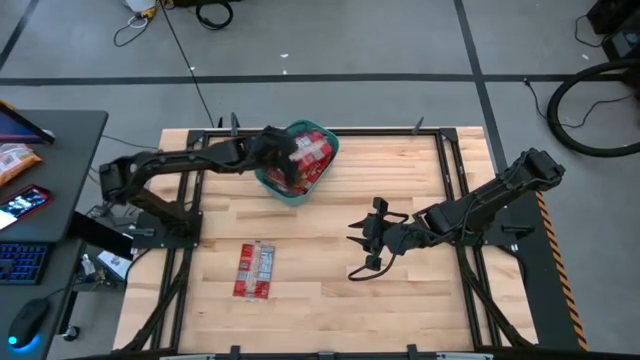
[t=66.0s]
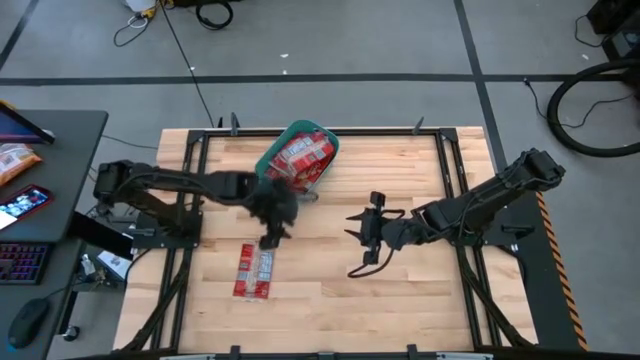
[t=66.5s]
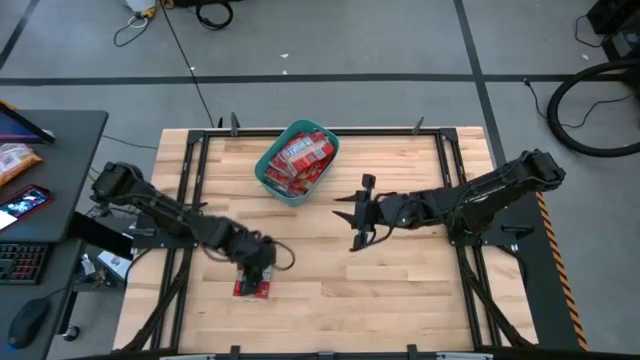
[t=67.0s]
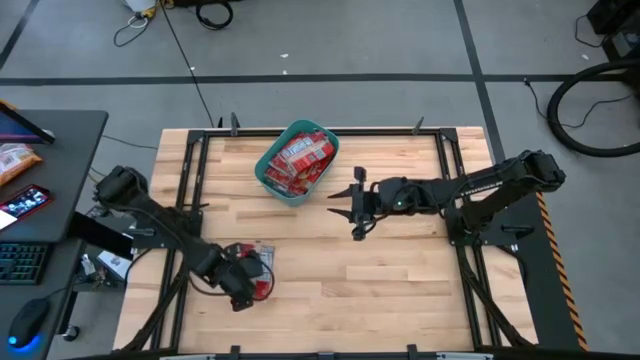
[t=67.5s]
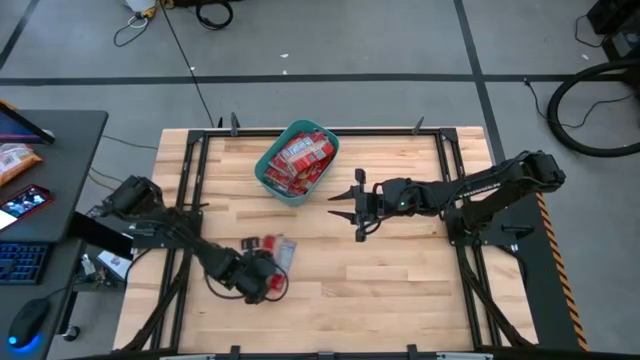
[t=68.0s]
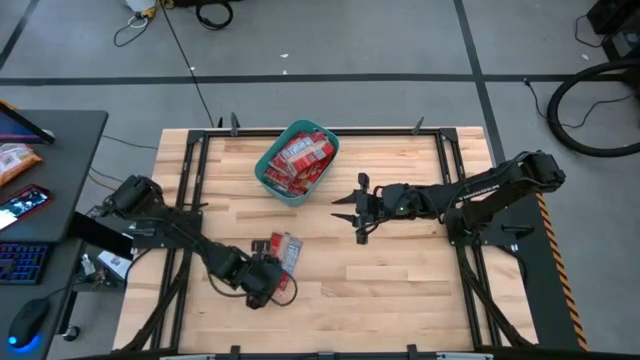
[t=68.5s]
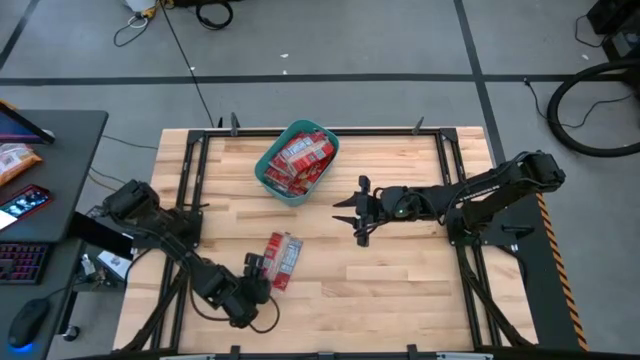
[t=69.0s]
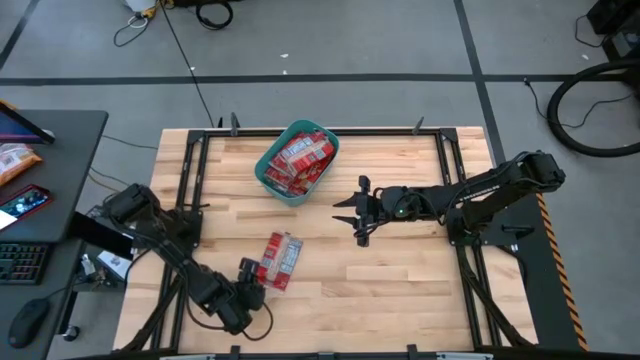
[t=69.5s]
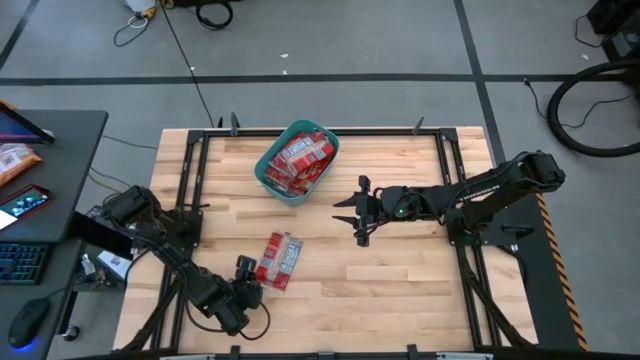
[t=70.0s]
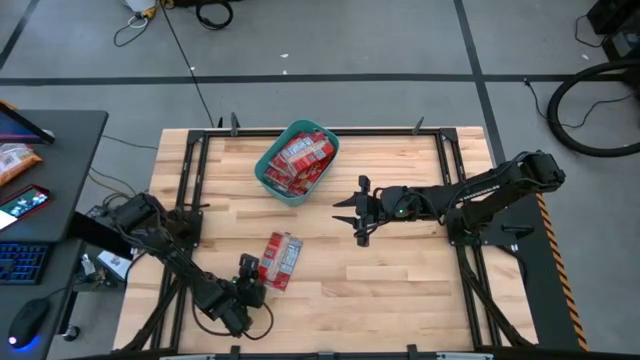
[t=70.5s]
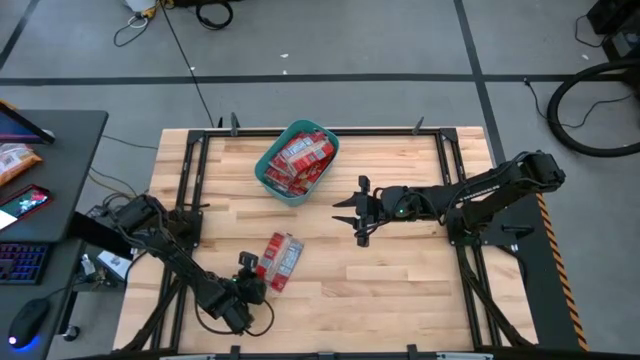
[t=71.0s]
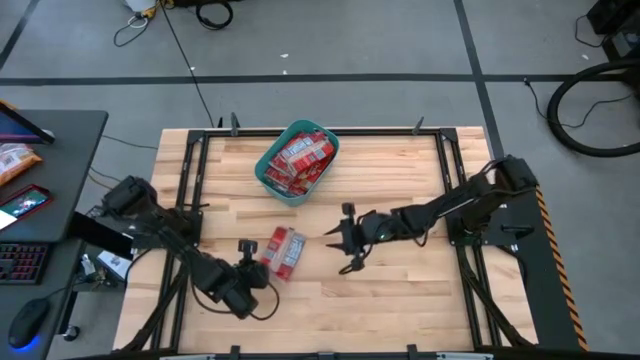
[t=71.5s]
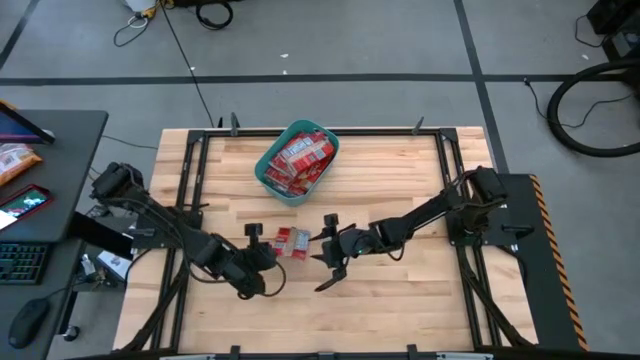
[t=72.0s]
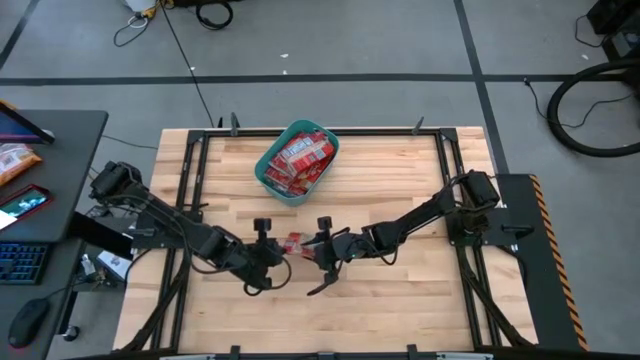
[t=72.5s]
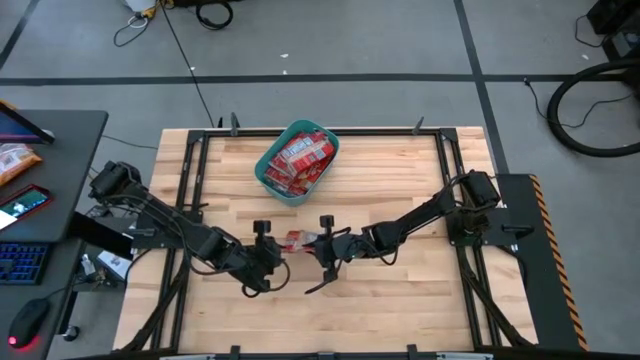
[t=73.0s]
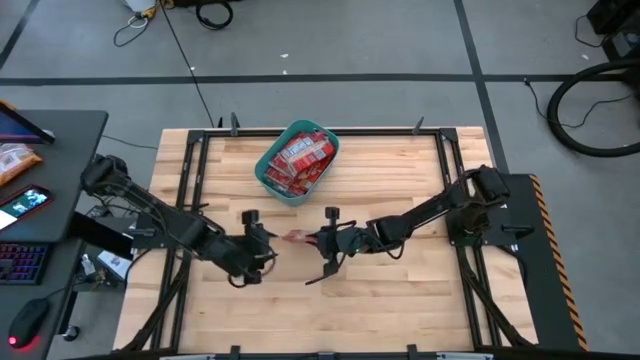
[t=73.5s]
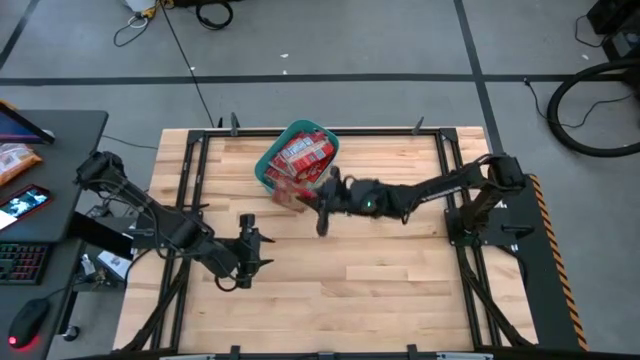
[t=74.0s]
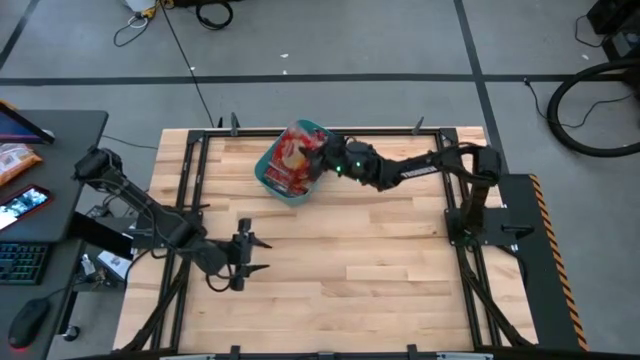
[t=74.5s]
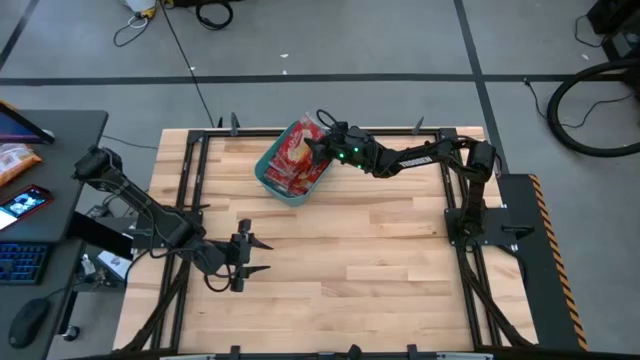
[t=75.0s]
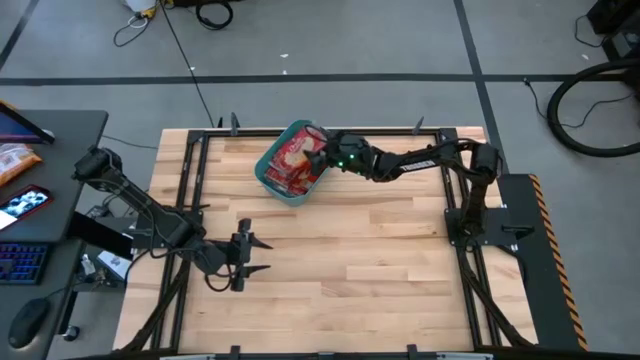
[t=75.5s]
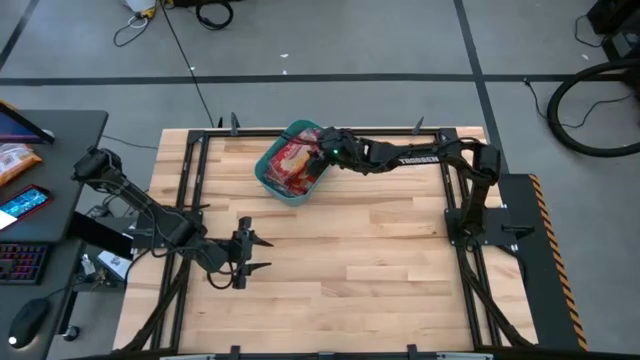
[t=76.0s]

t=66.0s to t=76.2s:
Task: Sort popcorn bags into baskets
Put the red popcorn bag into the blue bin

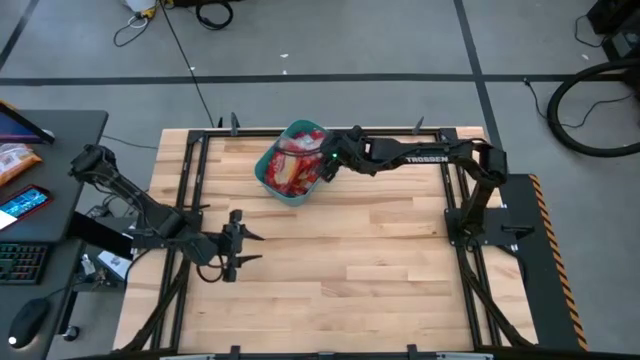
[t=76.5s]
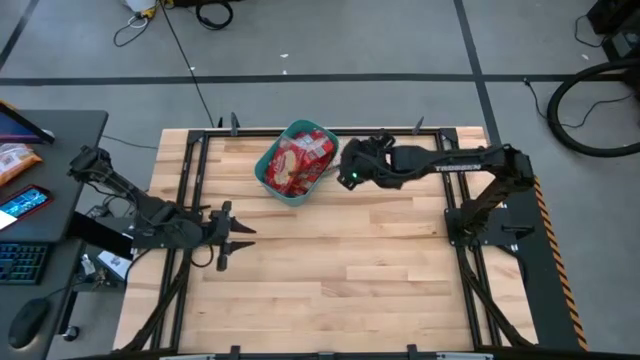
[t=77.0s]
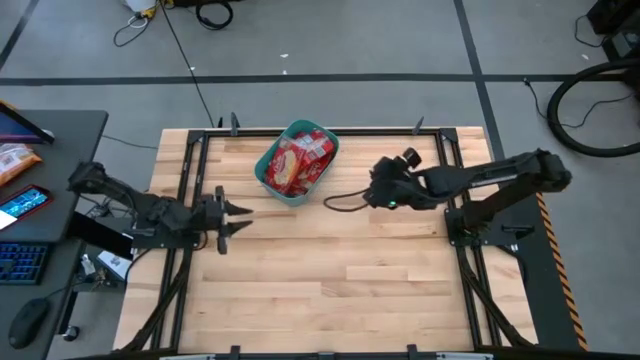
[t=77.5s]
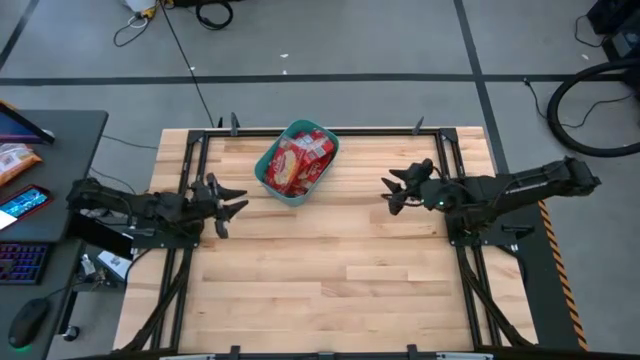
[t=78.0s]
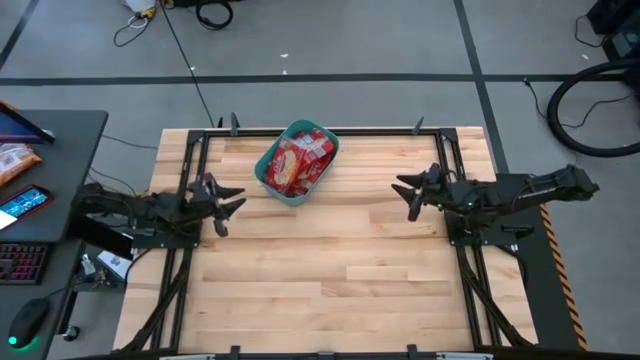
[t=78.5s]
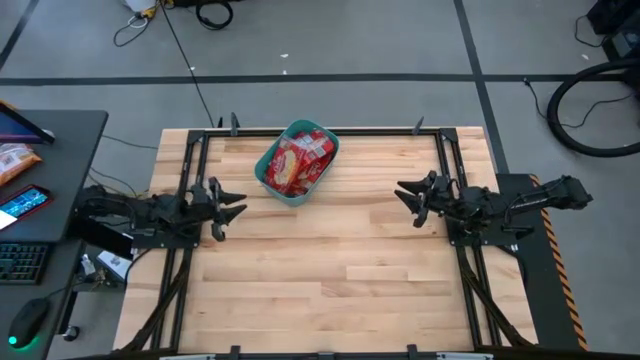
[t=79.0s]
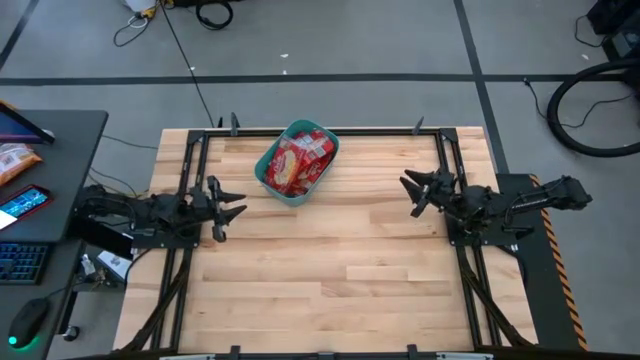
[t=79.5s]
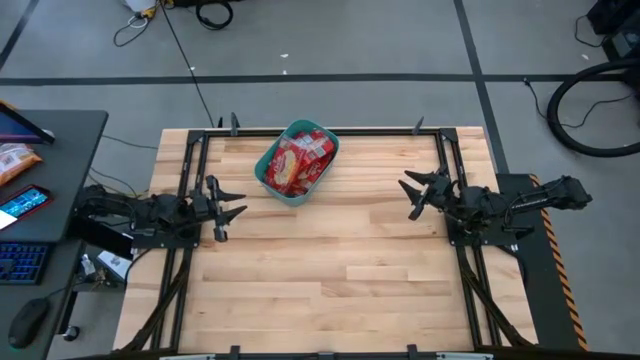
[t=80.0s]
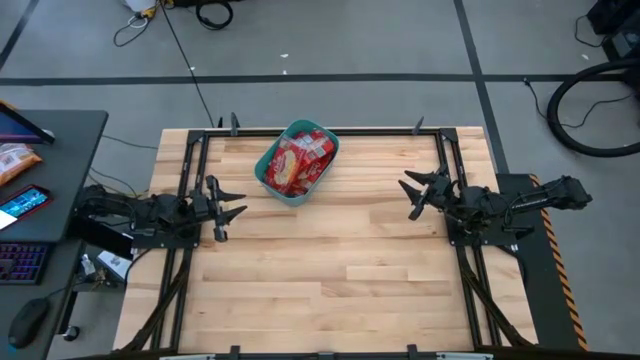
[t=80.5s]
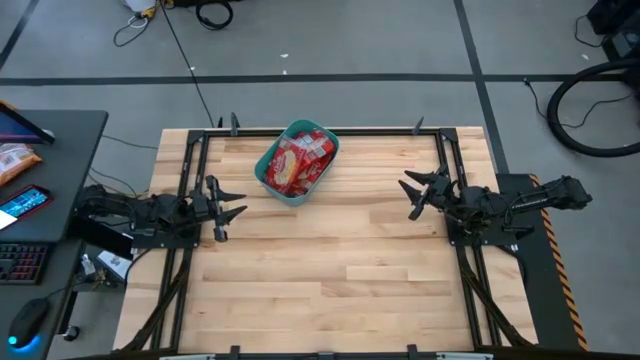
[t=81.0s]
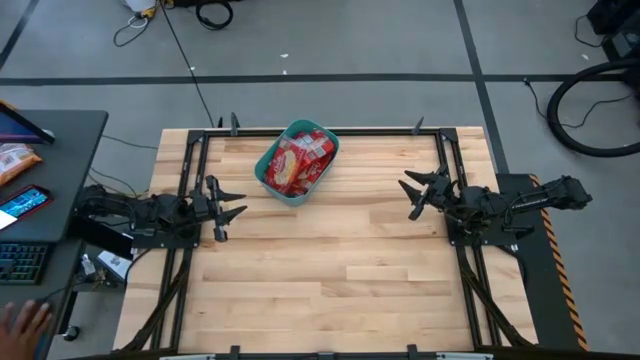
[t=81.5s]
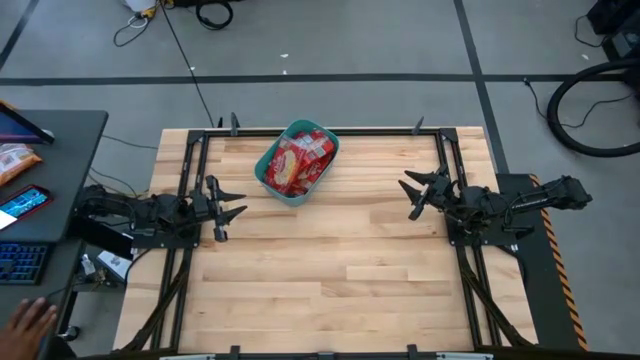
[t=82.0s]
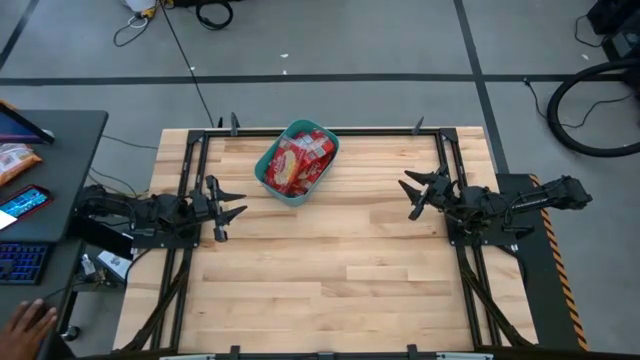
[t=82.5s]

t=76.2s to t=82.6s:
Return to Home Position

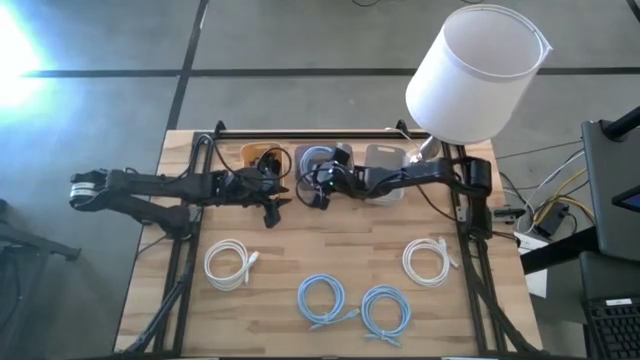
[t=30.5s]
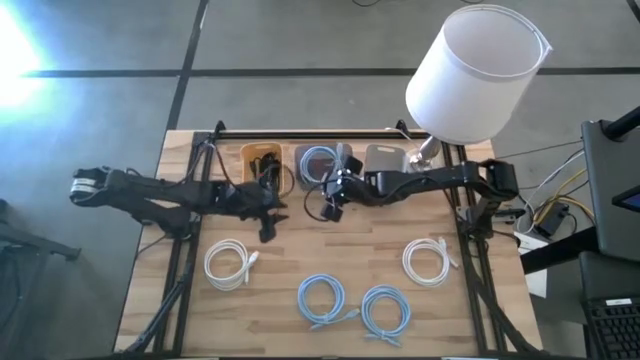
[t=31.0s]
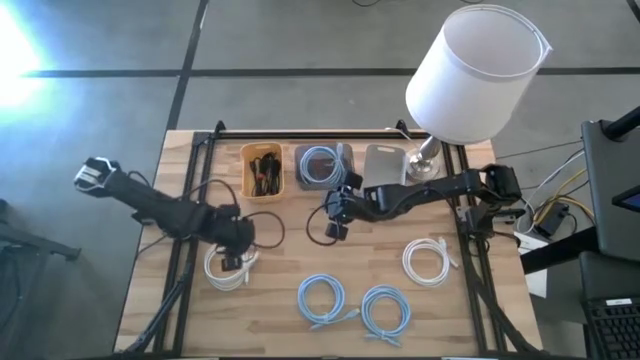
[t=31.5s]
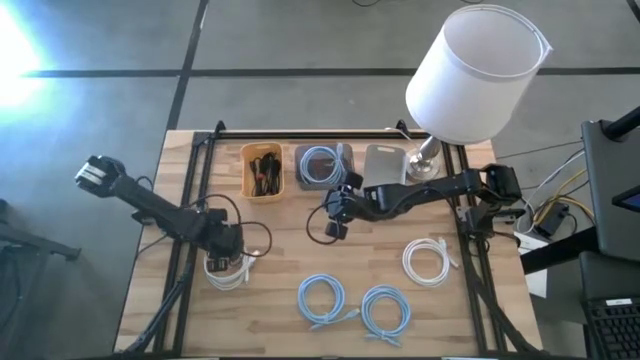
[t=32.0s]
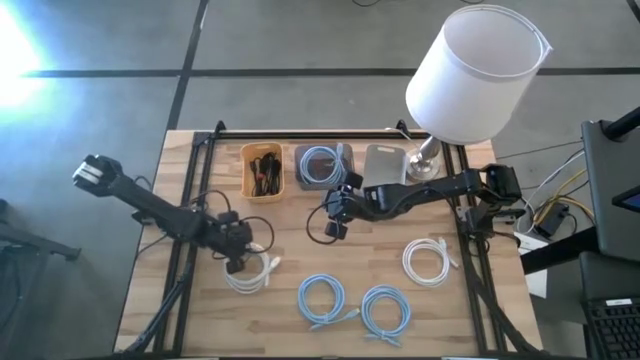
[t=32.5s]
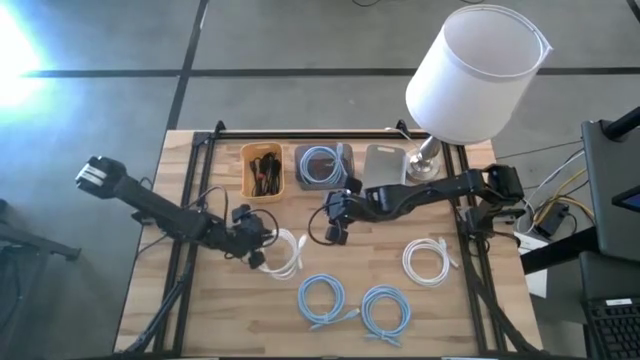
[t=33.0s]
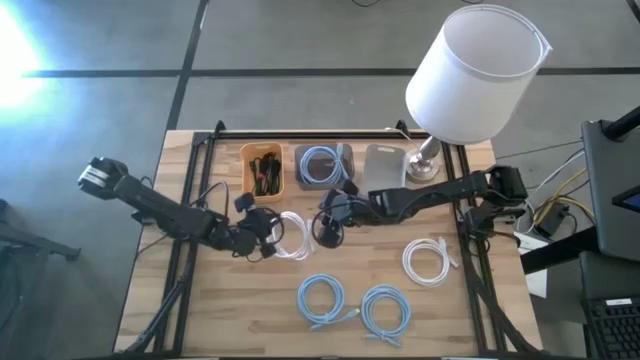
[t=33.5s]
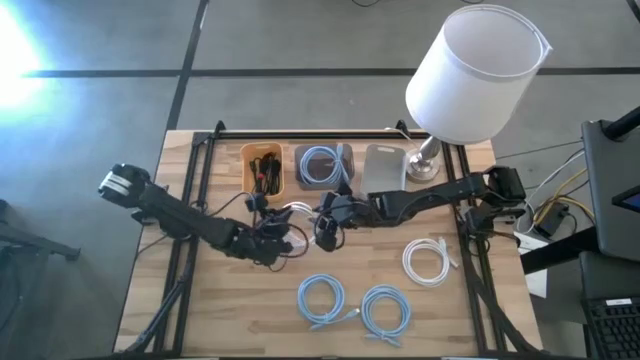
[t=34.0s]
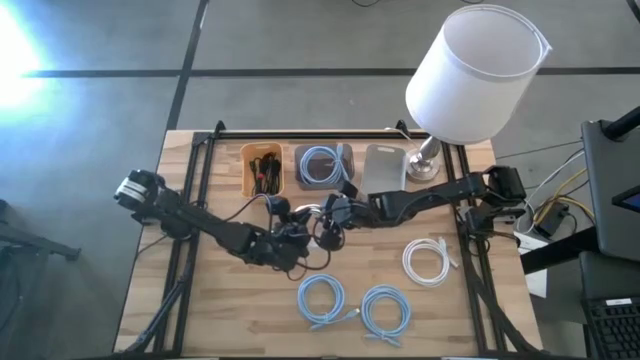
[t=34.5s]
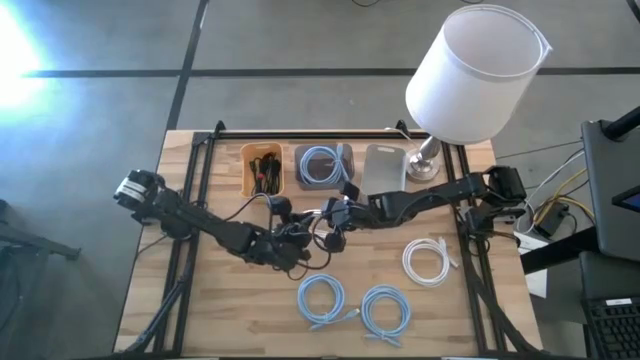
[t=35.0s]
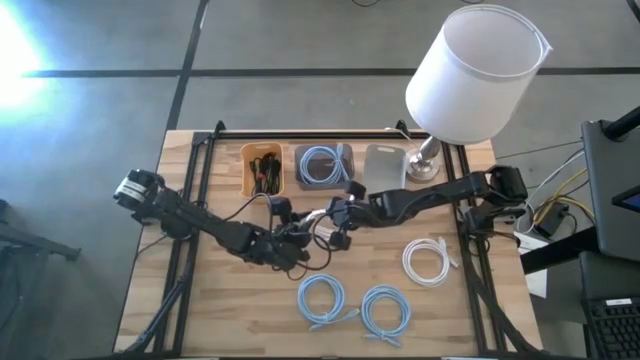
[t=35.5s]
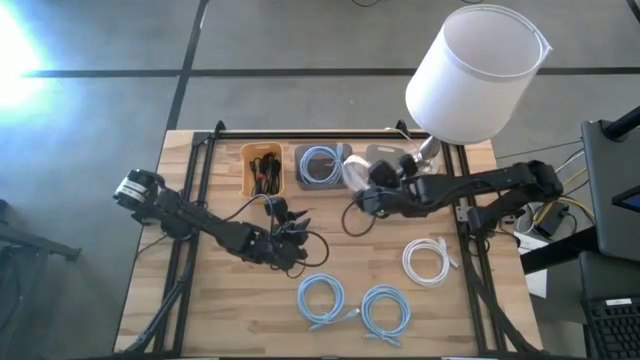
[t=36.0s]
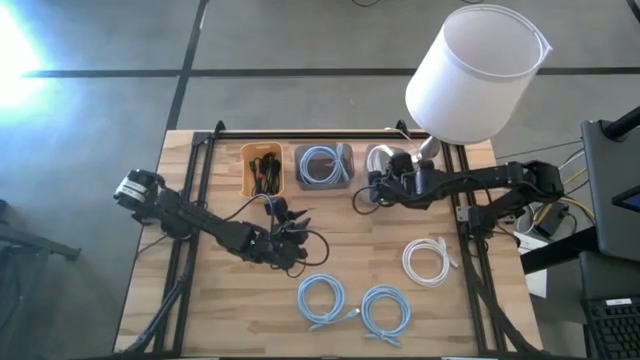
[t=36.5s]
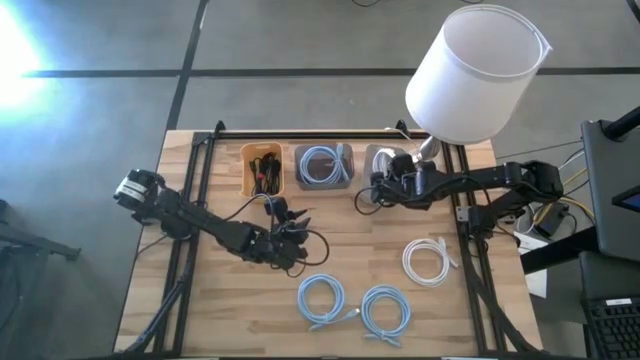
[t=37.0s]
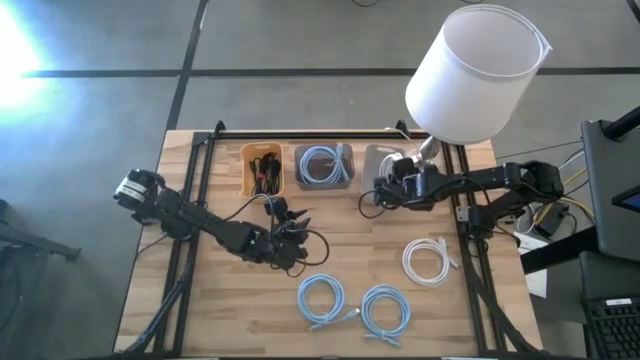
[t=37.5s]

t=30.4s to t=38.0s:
Task: Pick & Place USB Port
Put the left white charger cable into the gray bin
